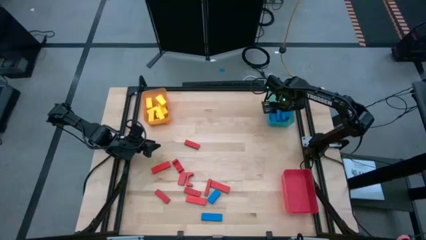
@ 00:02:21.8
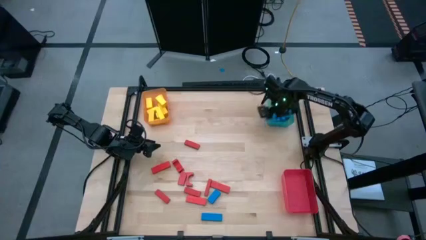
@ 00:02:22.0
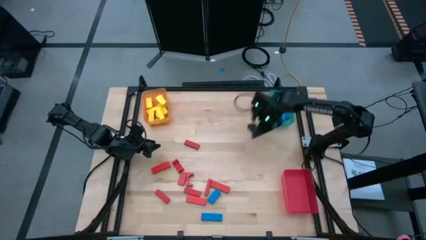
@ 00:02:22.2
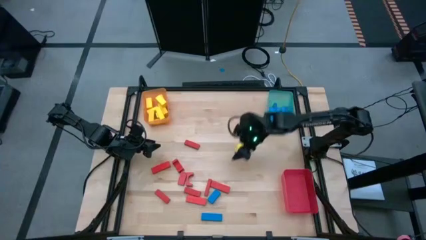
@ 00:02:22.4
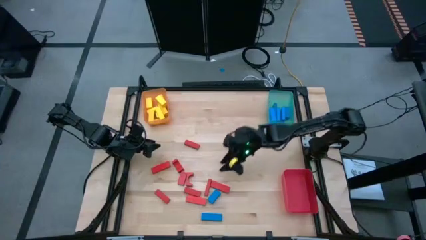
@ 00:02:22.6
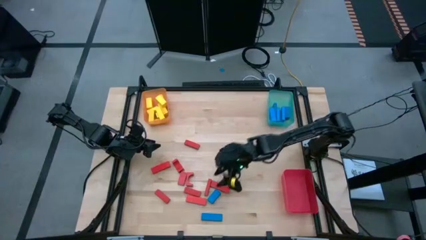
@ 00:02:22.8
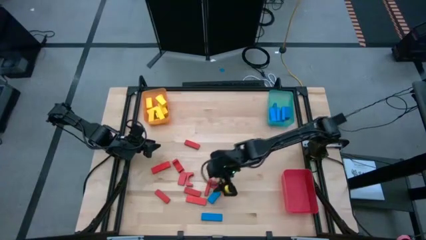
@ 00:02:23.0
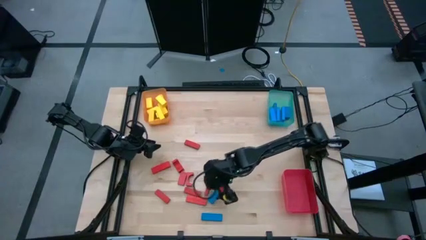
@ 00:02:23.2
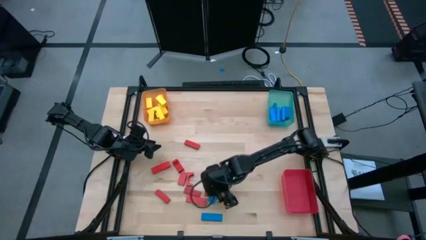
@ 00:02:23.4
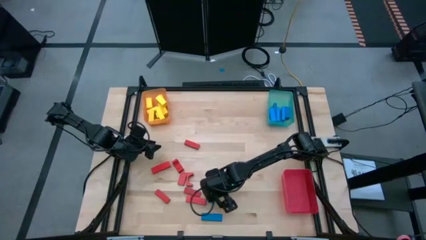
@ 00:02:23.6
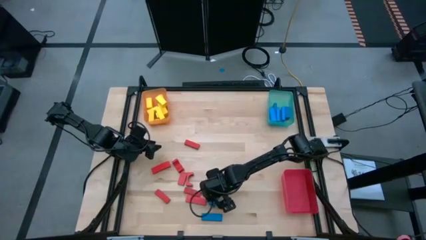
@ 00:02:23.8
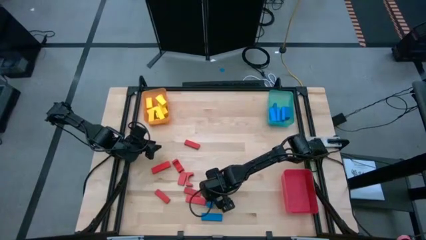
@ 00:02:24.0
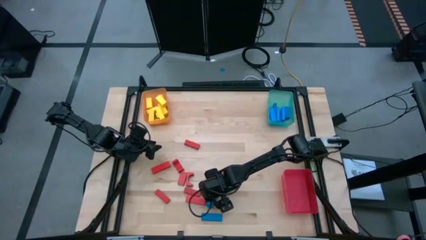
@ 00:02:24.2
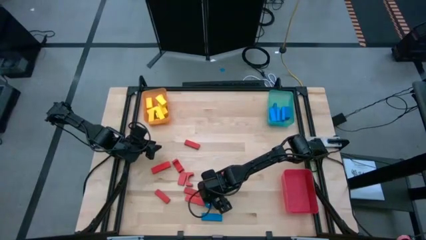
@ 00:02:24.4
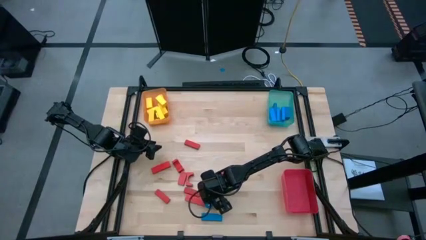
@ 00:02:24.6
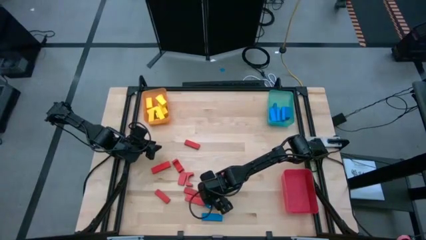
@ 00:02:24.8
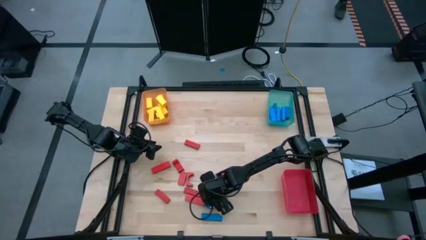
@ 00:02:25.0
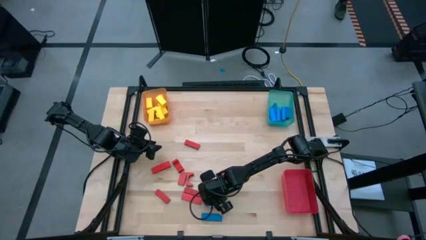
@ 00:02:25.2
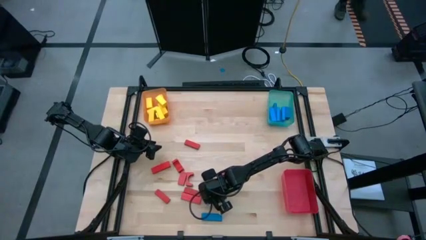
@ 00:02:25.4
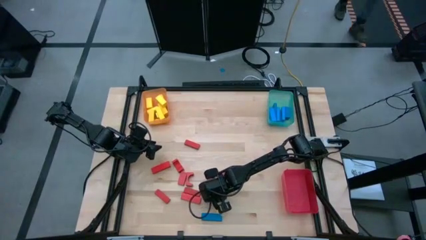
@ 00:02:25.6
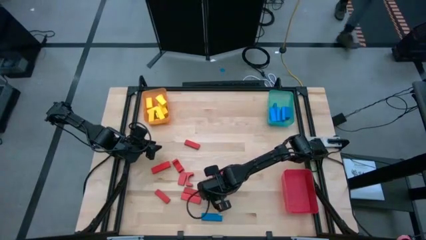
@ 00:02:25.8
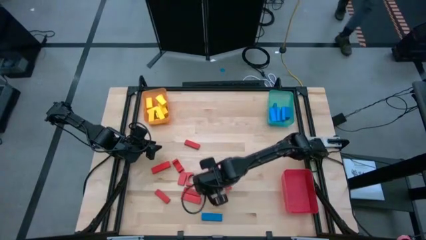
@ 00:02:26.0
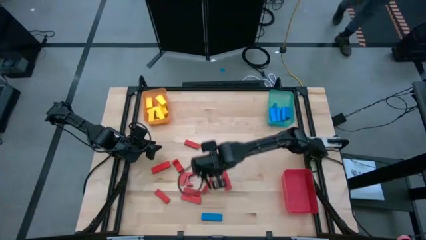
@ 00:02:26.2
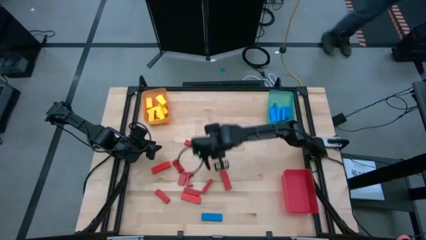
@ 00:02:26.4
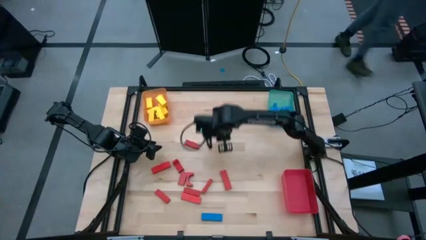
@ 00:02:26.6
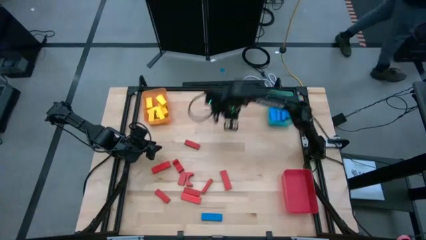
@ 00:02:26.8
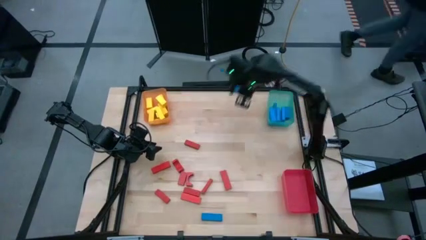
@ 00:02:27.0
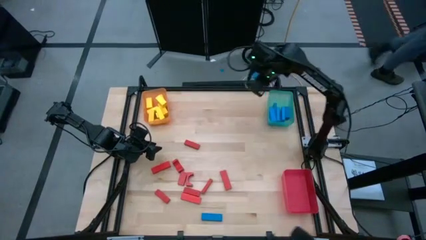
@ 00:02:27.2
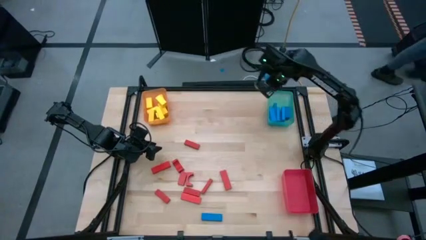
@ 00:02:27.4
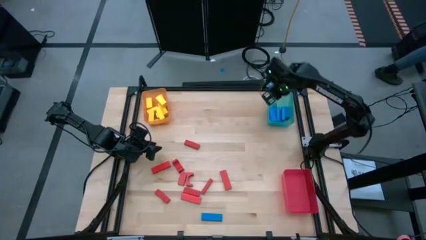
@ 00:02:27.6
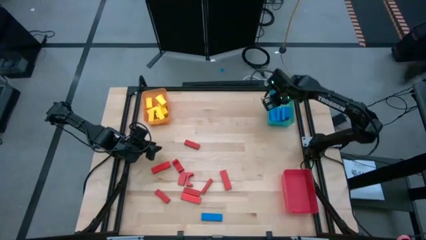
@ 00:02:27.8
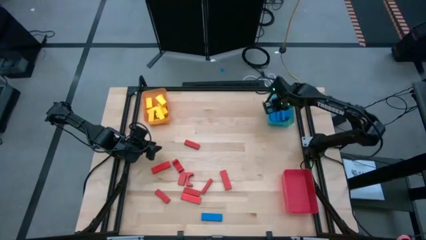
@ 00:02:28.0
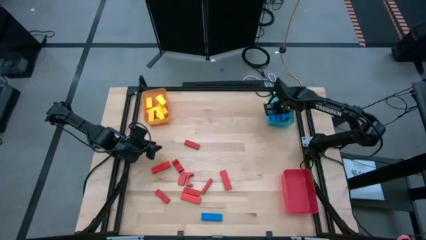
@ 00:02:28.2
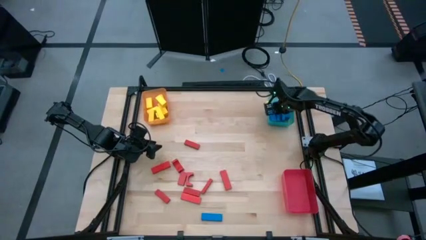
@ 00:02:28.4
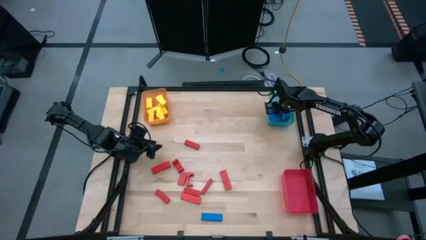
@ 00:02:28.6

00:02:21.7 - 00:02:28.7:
Task: Sort blocks
Put the blue block into the blue bin

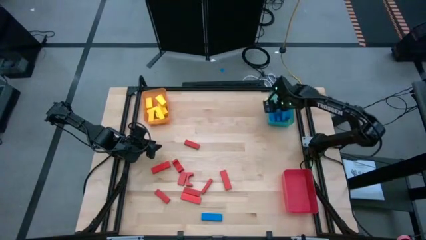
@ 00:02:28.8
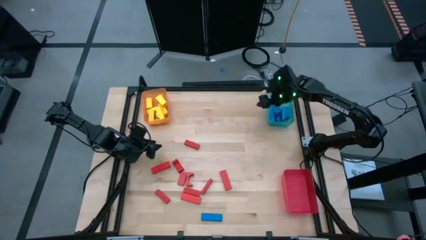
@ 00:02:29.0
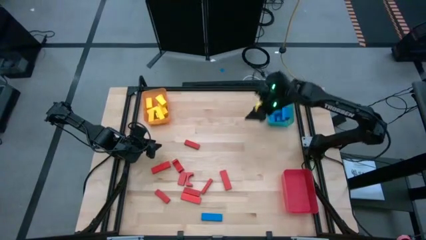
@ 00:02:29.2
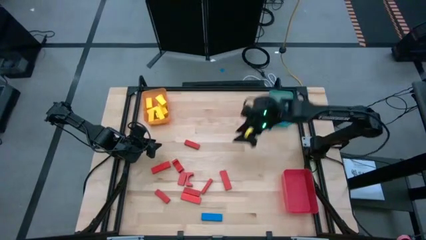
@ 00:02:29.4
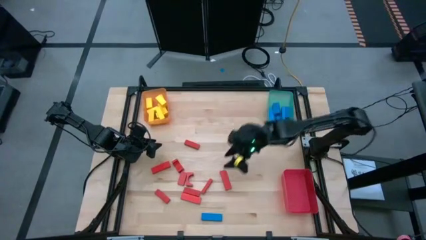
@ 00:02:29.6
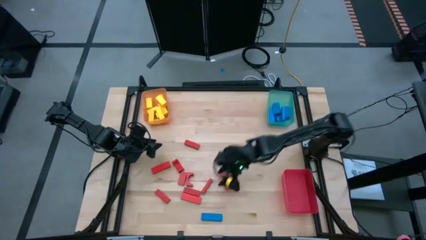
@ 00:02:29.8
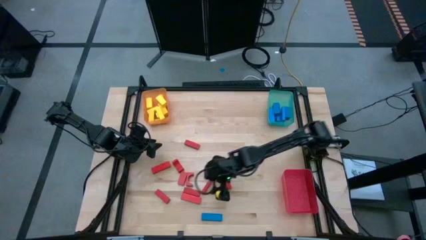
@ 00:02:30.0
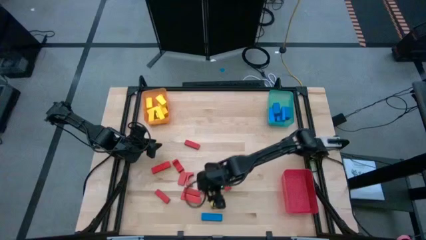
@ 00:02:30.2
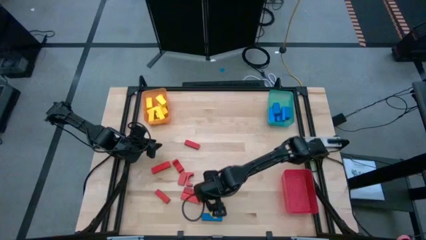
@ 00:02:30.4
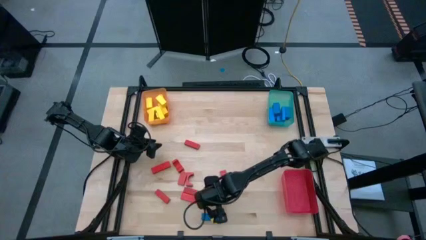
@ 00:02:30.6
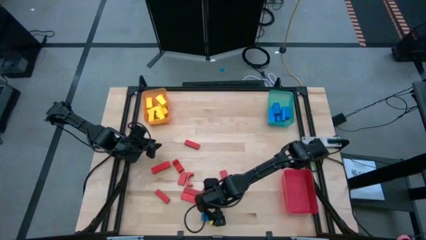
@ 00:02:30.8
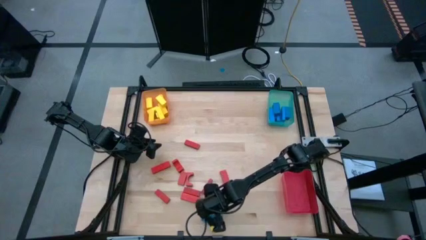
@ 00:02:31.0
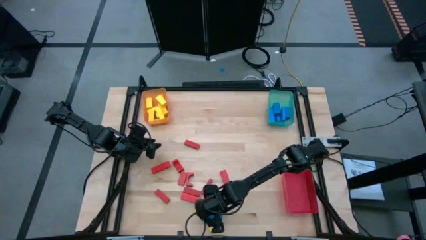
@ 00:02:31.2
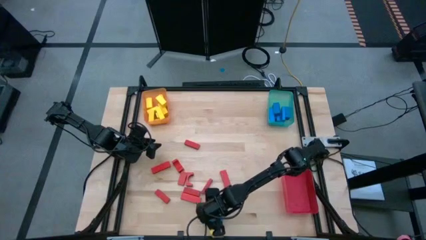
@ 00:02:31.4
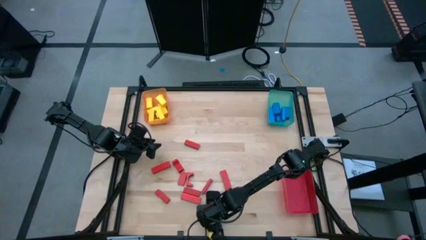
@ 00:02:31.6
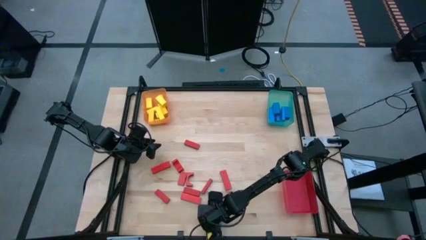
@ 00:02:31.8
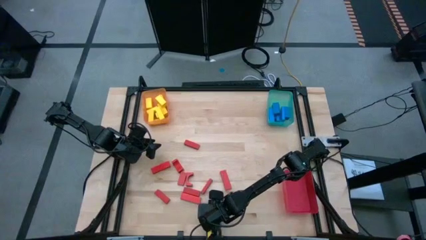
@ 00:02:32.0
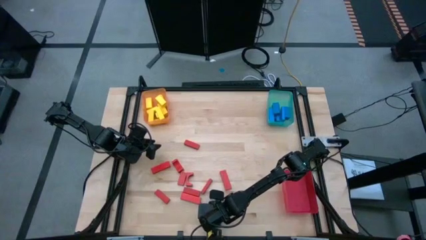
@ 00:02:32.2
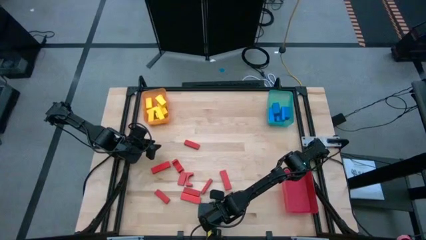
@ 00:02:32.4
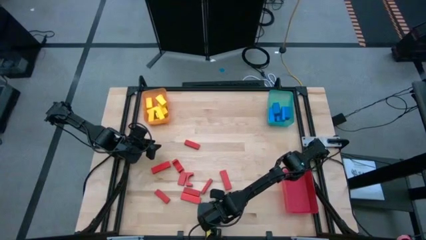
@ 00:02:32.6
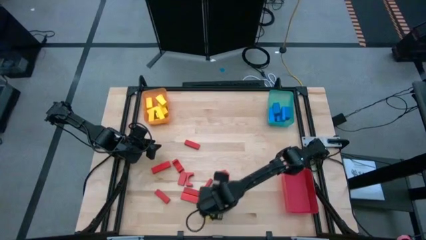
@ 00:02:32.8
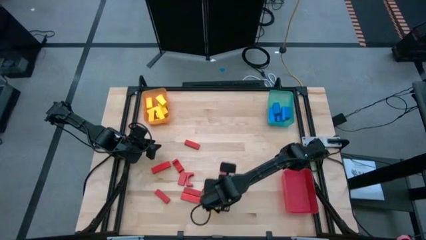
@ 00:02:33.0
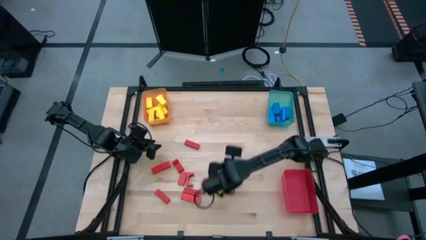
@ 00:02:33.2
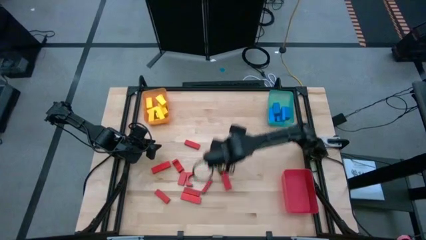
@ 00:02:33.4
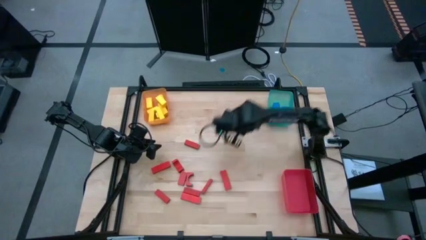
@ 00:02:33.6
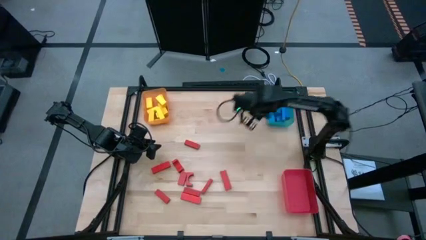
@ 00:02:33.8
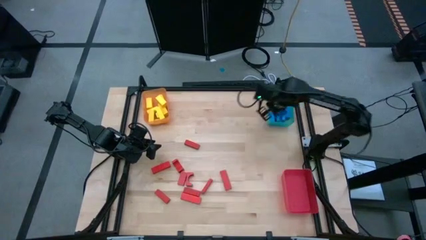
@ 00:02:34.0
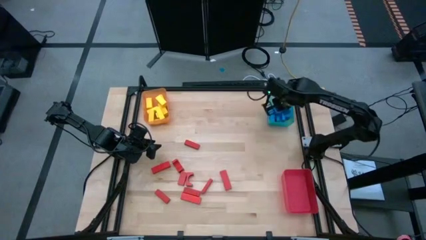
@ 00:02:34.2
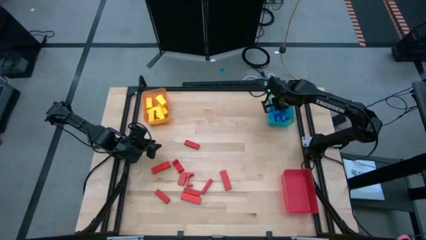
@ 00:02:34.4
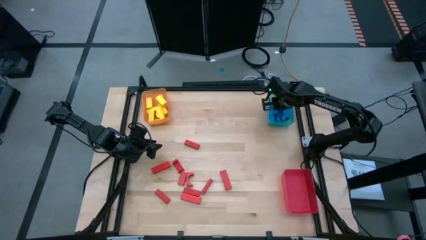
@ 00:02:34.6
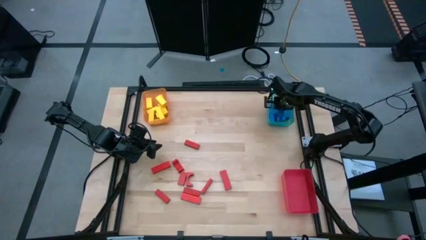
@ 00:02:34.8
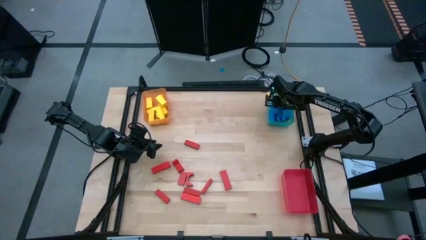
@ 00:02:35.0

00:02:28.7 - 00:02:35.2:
Put the blue block into the blue bin
